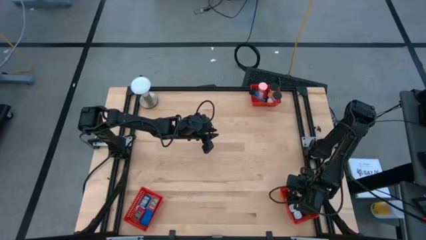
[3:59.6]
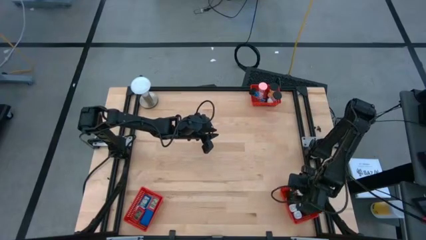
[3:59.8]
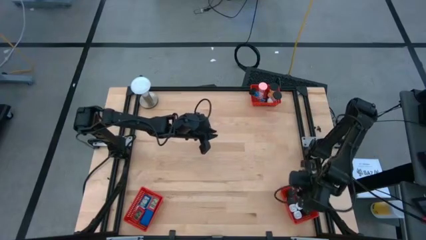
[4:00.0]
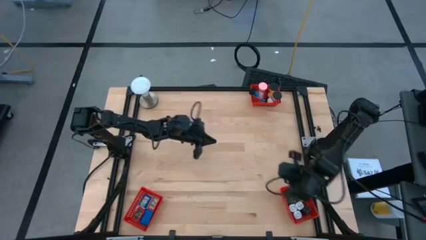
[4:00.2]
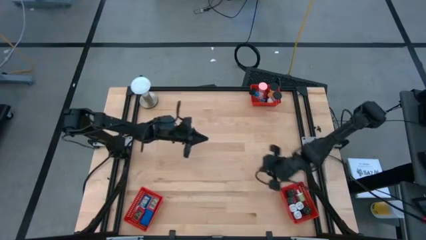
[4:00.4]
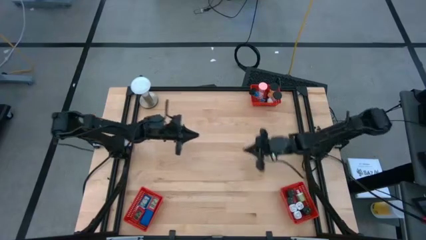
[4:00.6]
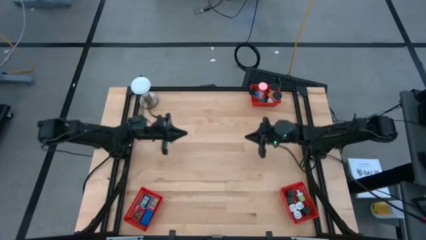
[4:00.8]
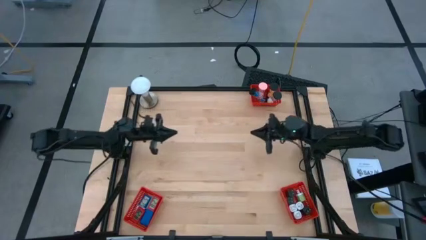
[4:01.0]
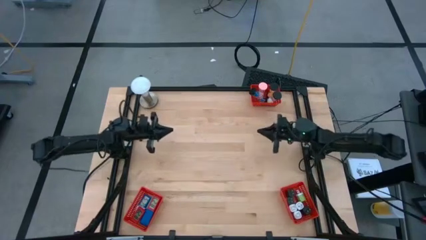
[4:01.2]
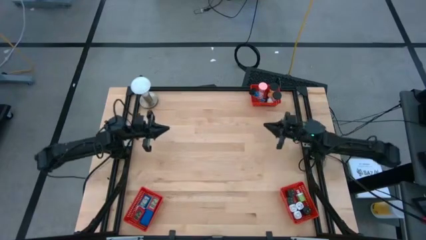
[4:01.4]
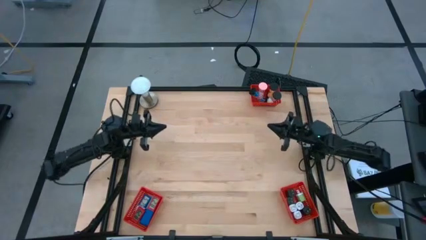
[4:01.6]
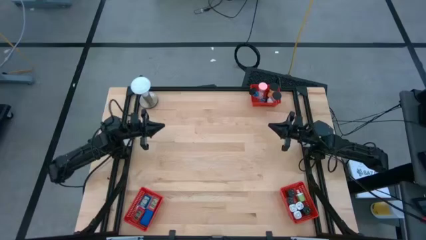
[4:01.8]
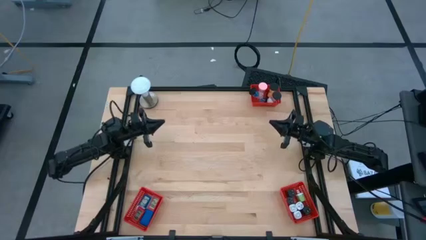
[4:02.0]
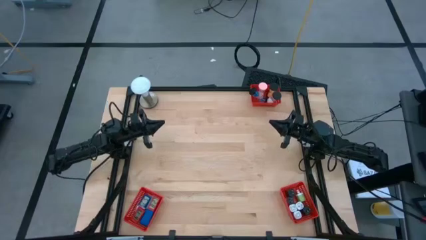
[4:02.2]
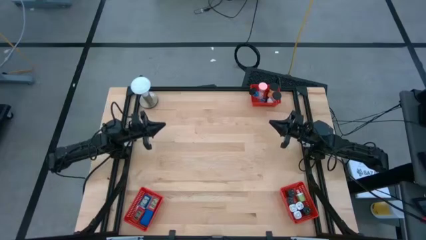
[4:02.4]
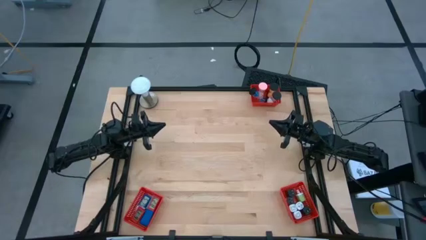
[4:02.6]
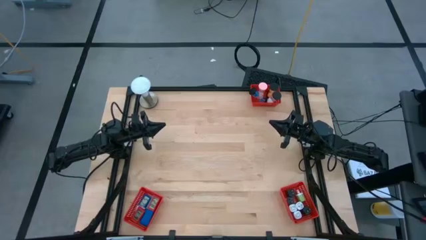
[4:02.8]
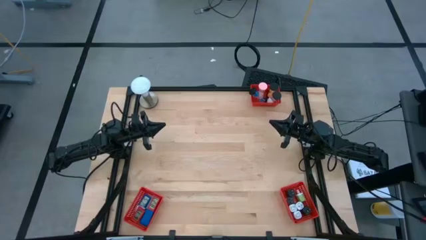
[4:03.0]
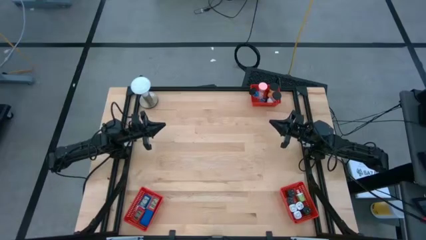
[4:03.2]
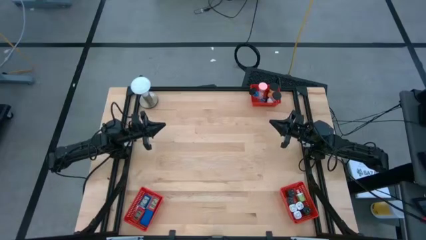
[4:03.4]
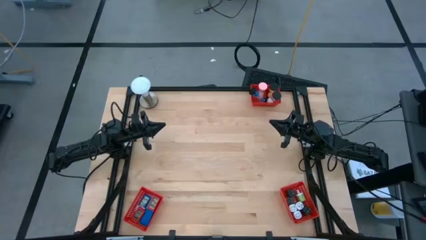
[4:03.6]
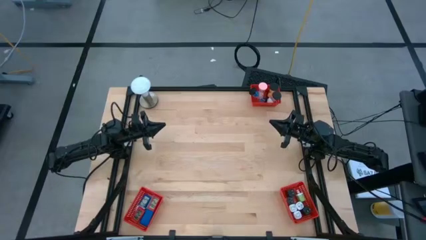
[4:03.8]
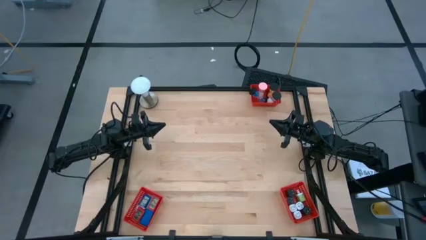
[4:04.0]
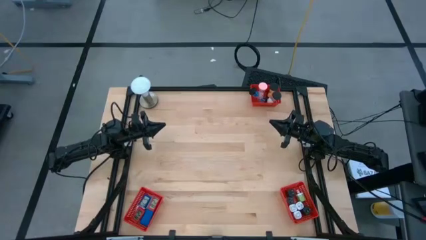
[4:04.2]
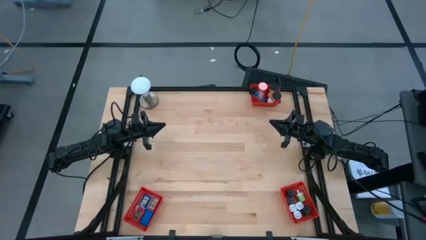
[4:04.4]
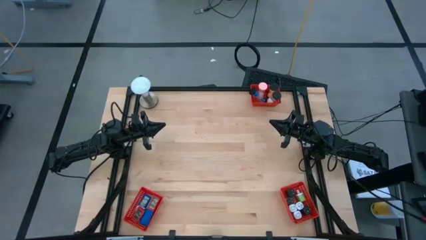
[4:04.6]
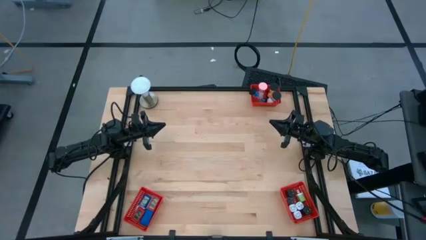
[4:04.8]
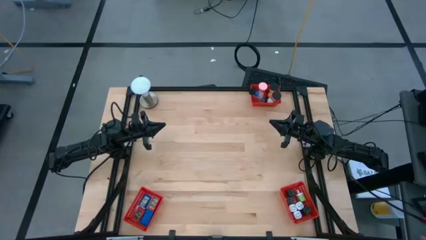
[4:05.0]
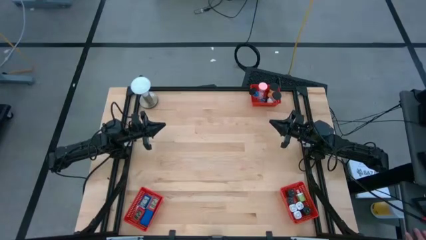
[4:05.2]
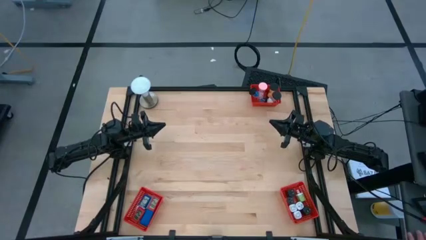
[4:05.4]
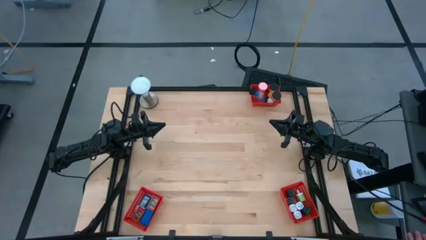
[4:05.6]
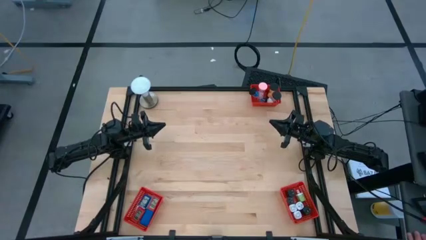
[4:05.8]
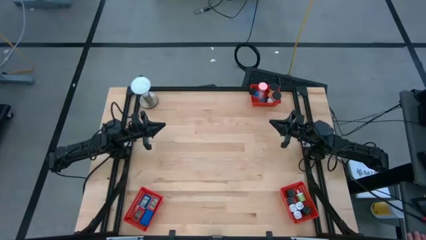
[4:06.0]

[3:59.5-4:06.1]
Task: Pick & Place Office items
Return to Home Position

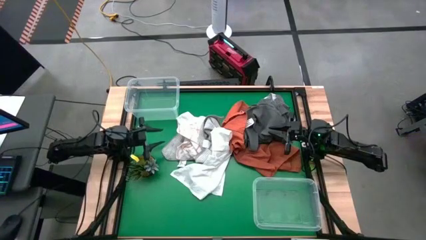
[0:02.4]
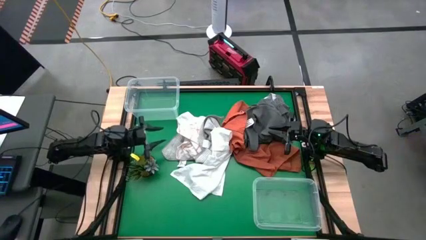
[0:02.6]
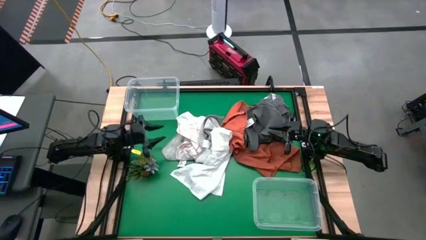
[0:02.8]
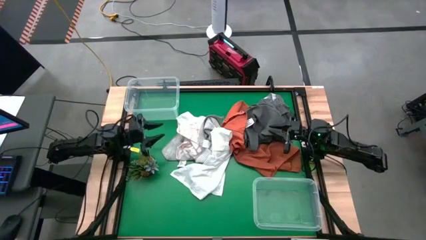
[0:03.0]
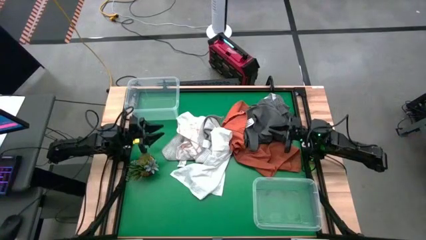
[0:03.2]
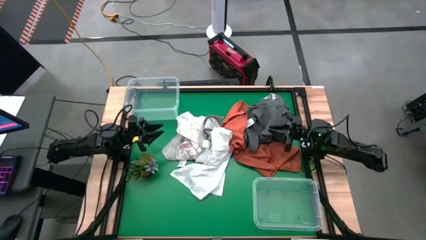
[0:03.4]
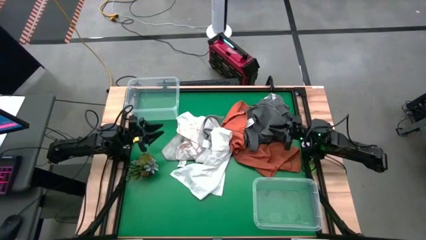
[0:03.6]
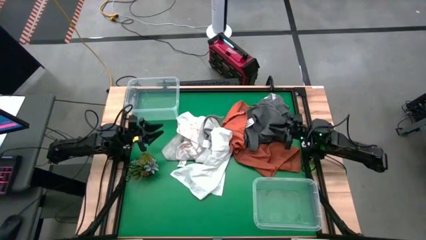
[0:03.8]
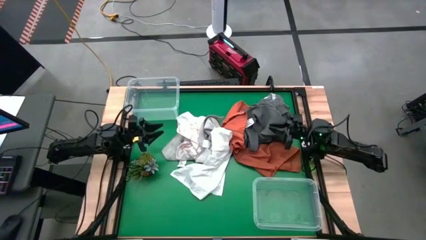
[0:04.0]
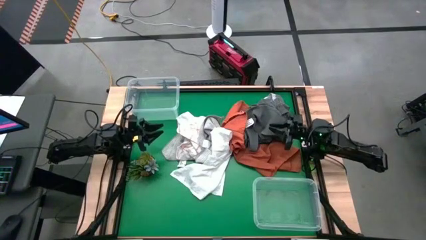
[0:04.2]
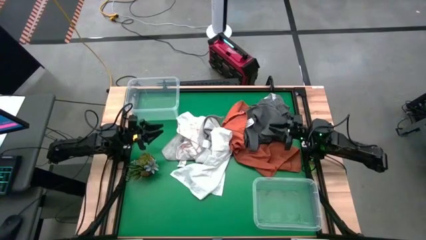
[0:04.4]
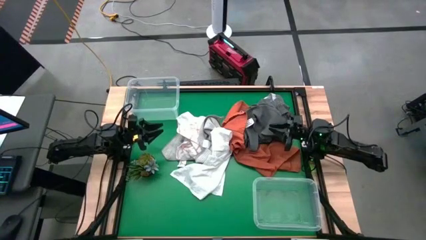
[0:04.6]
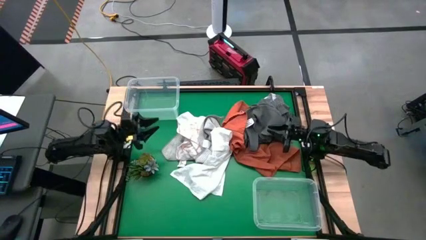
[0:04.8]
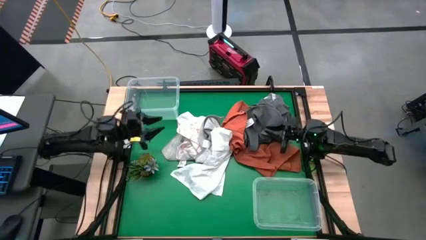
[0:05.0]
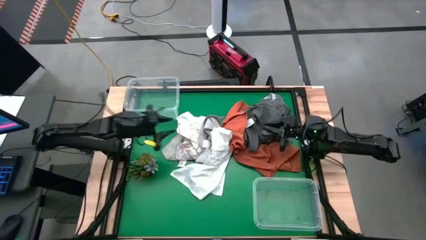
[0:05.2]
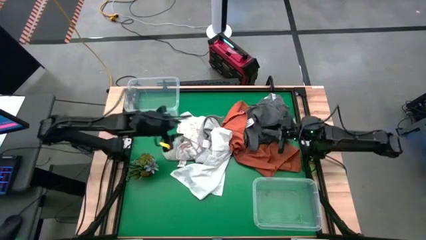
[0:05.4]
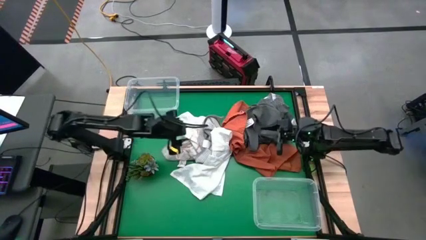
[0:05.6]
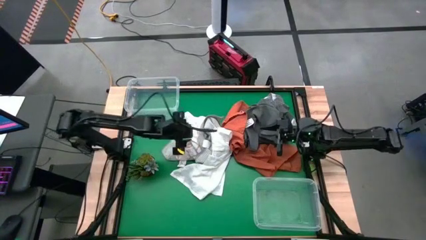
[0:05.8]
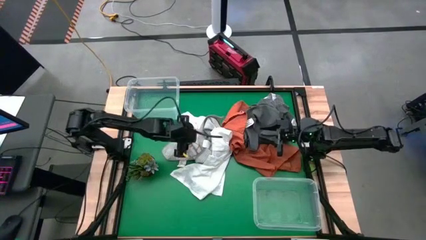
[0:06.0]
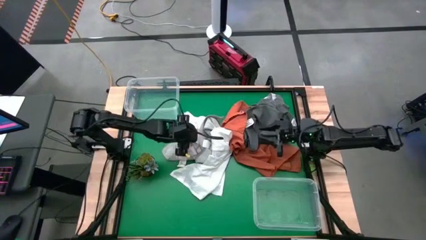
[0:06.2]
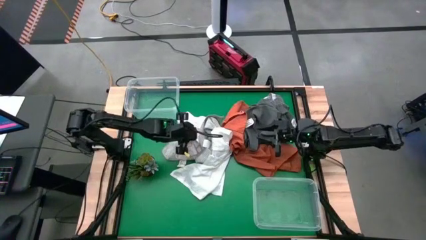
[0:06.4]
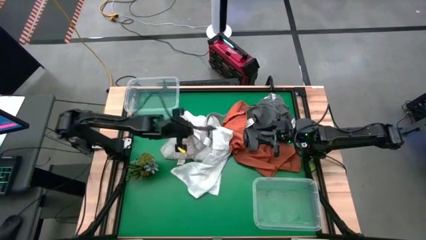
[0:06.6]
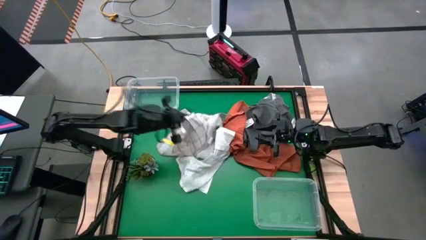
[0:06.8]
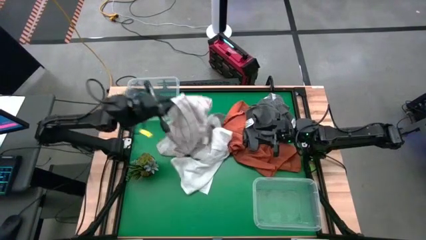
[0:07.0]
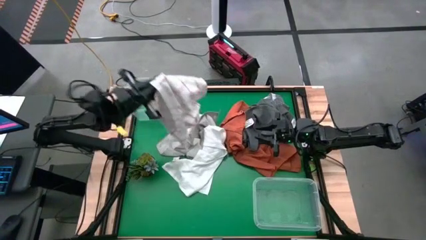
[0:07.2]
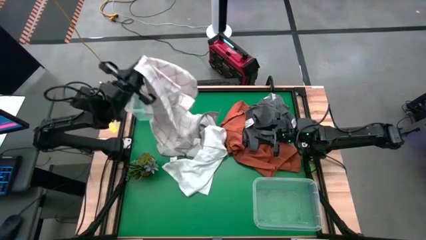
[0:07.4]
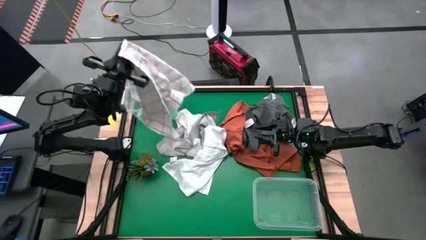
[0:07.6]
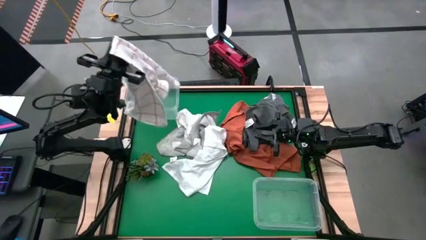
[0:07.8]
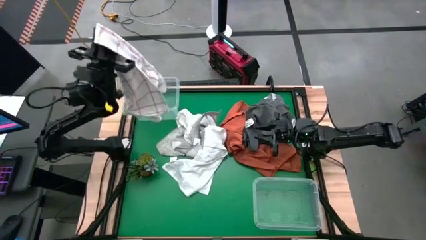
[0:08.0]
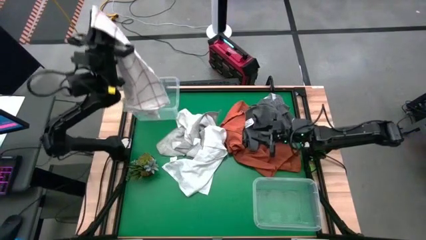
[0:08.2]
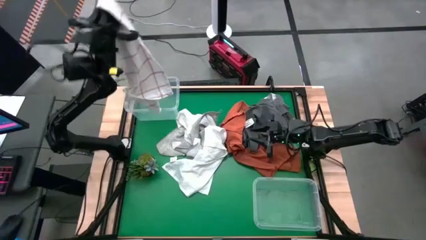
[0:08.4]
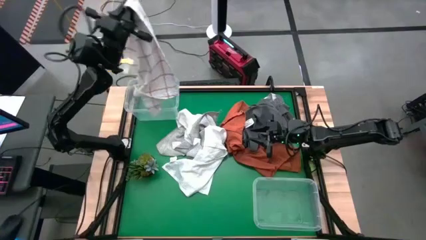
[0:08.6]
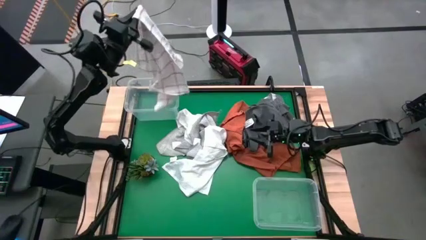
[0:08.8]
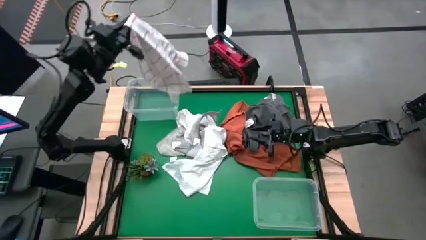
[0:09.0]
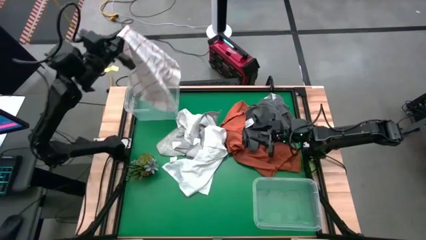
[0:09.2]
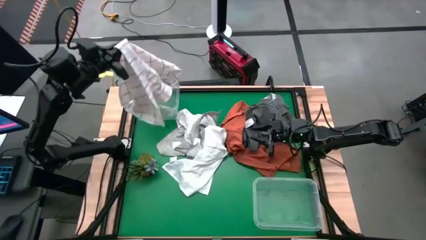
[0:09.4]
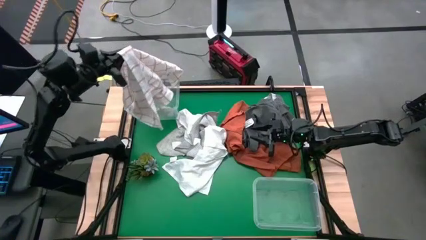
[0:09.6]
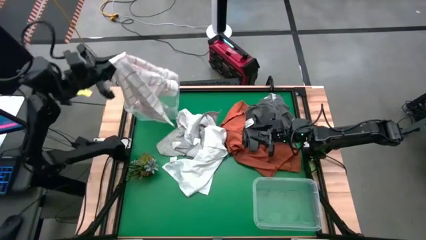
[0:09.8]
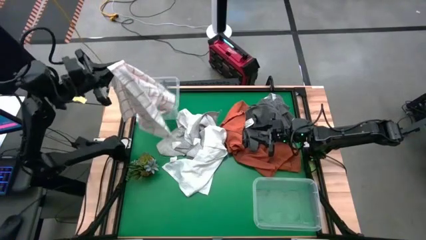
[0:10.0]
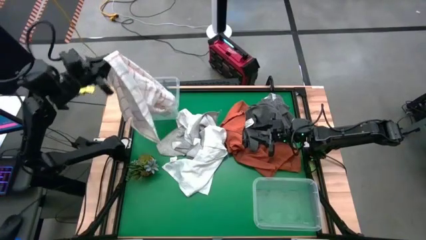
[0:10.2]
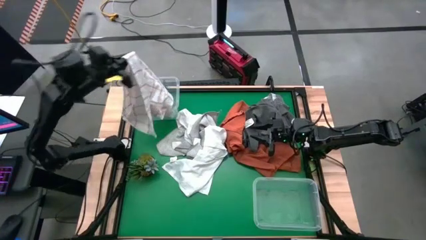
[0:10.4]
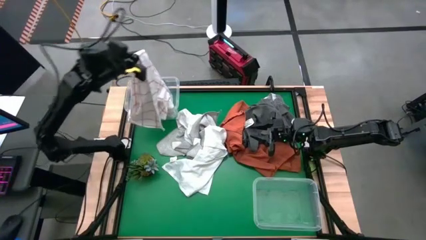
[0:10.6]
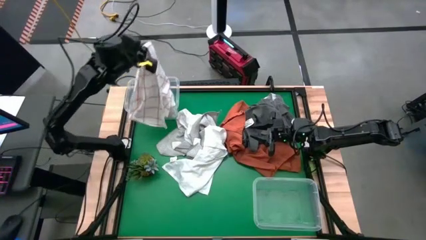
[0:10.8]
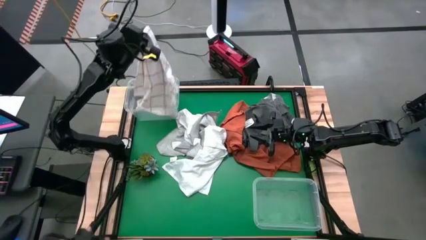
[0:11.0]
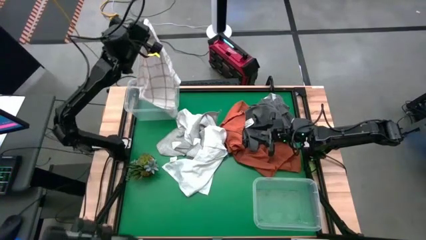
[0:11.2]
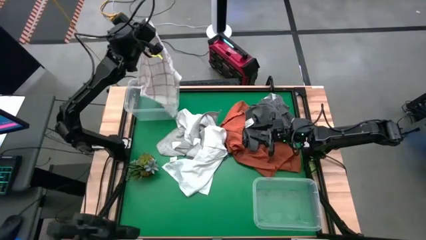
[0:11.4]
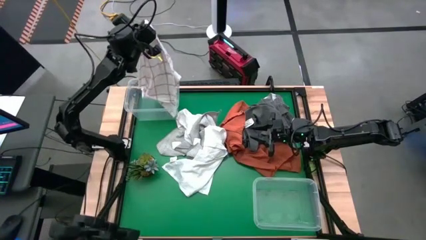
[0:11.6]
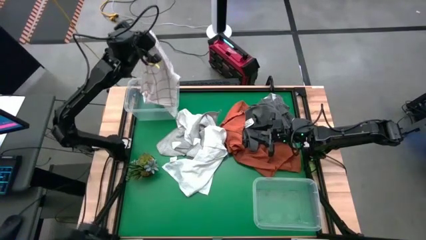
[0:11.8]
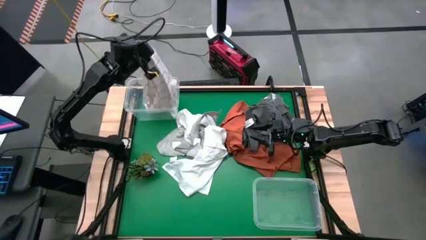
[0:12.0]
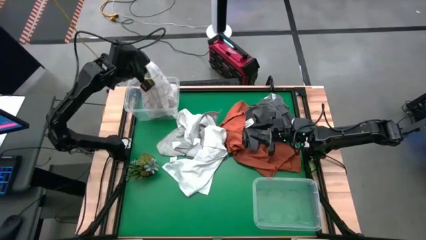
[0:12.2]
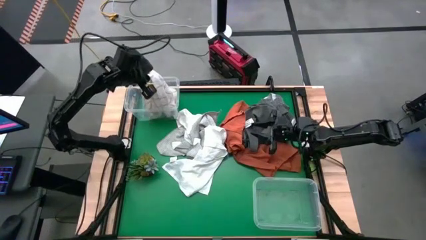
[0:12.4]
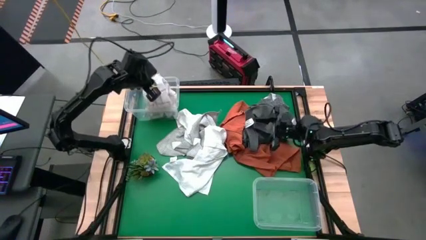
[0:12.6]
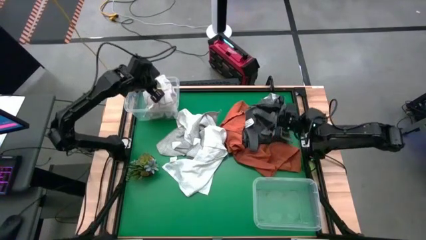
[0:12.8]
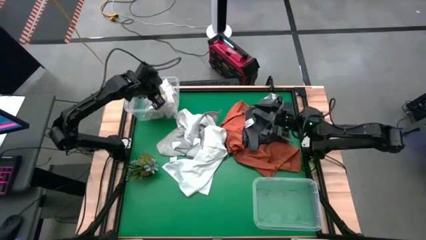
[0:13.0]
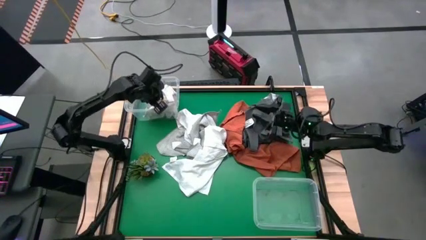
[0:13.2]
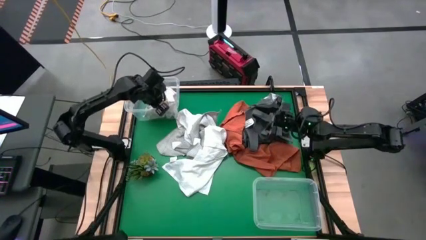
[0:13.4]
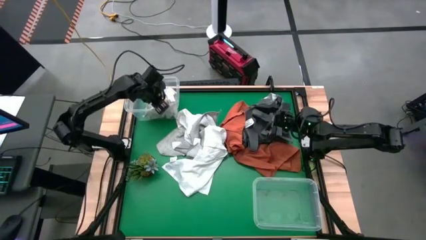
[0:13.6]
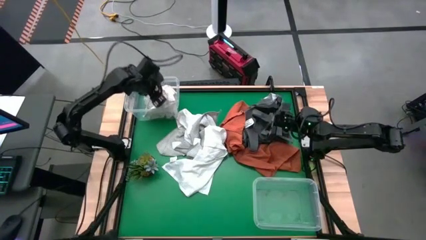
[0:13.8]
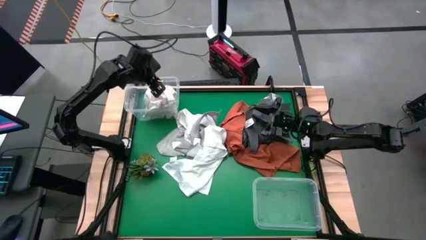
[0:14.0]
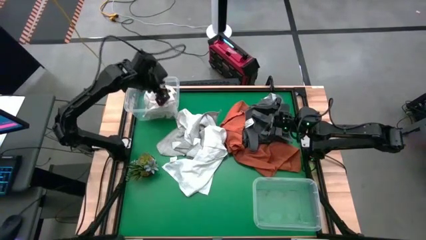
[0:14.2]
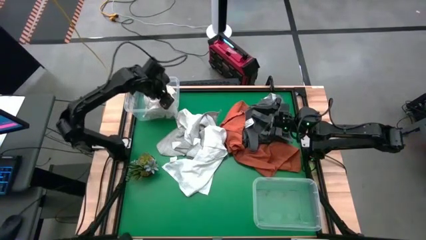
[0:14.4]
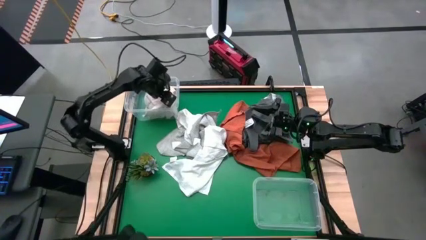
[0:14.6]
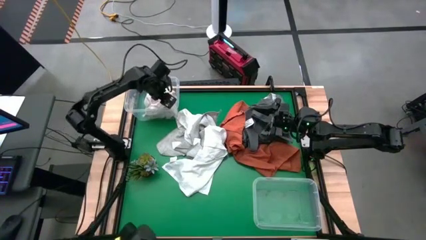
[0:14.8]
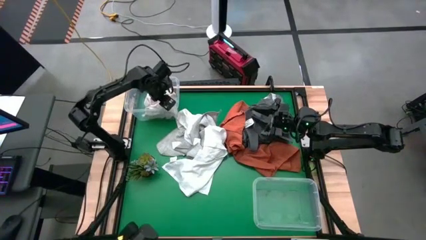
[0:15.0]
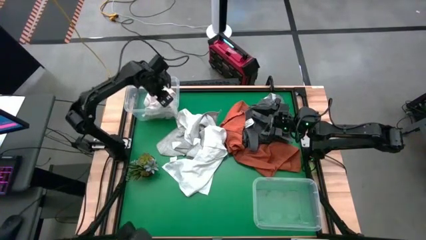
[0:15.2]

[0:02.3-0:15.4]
Task: Sort towels by color in basket
Put the white checkered towel into the top transparent bin
